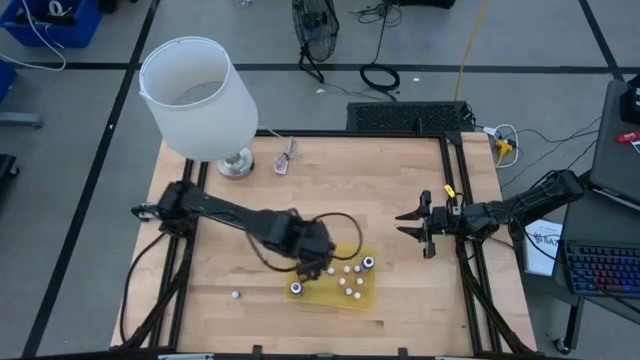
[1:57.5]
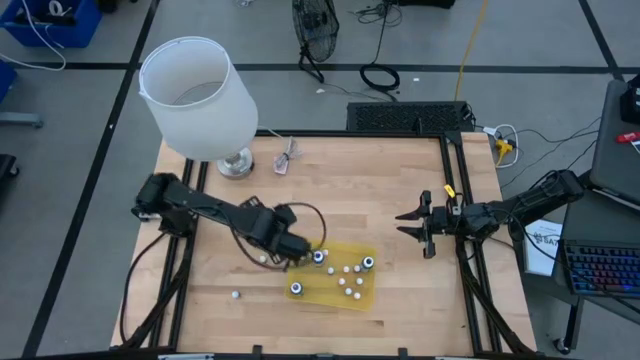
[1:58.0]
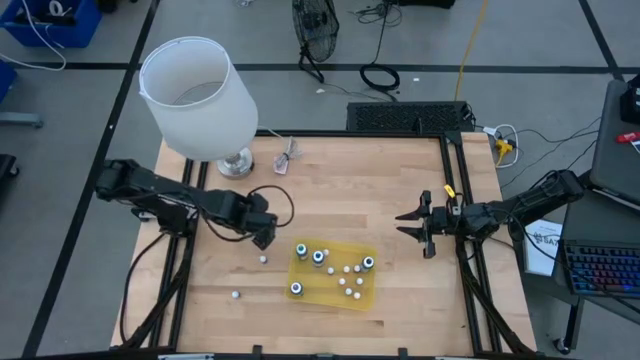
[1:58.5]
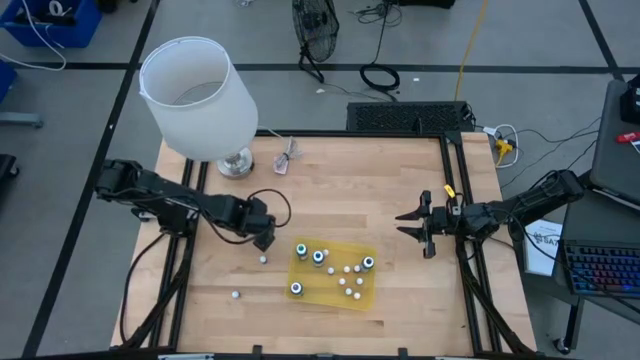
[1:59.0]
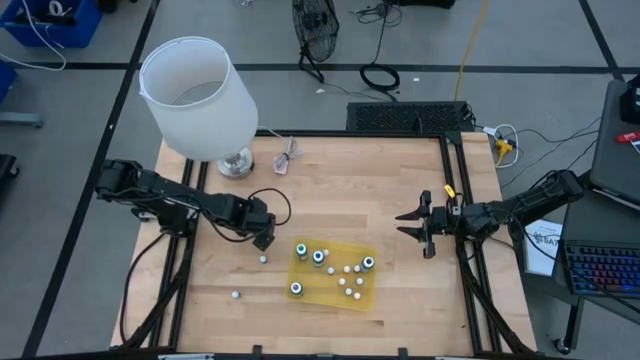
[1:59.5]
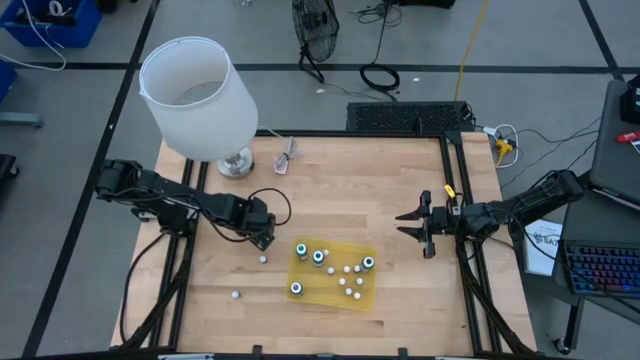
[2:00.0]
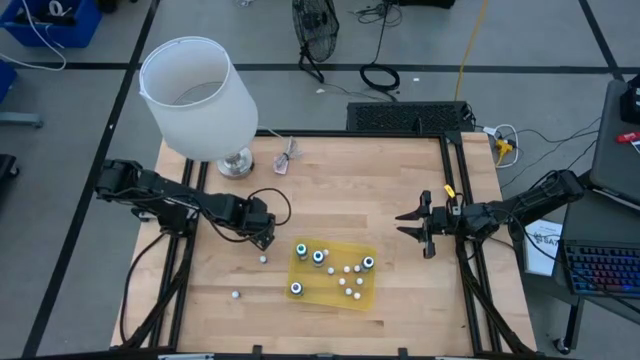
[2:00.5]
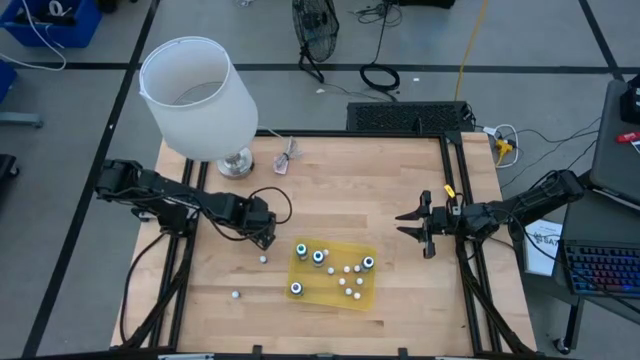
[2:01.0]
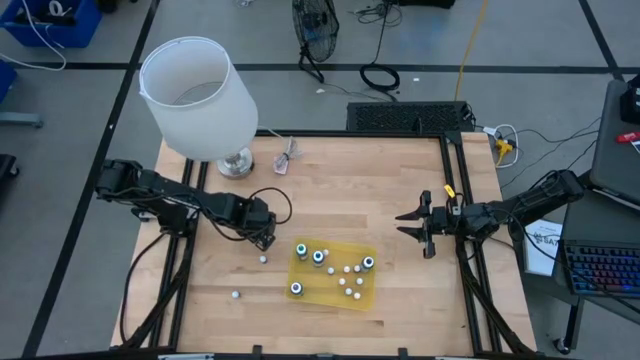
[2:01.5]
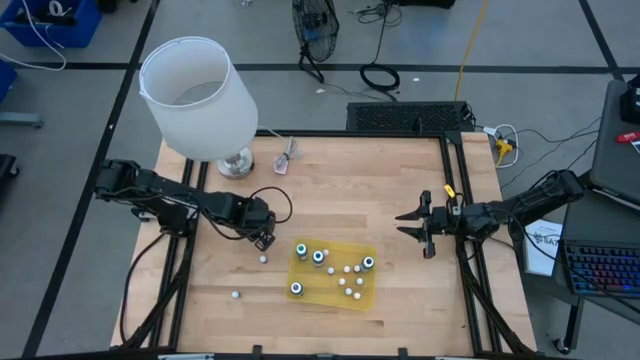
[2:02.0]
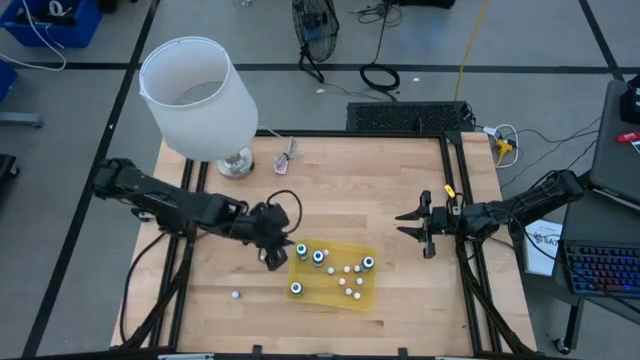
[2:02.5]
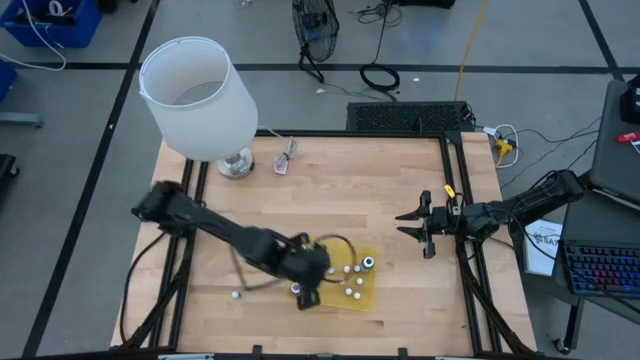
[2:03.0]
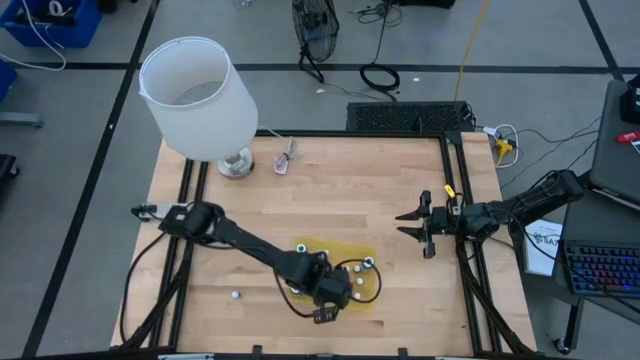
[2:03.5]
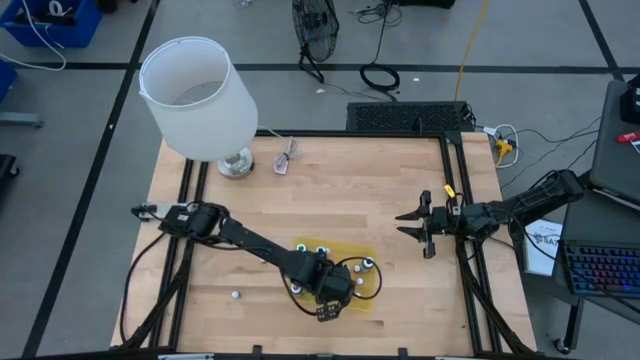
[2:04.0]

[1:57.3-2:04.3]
Task: Pick & Place food coloring
Put the small dark blue food coloring bottle into the yellow container

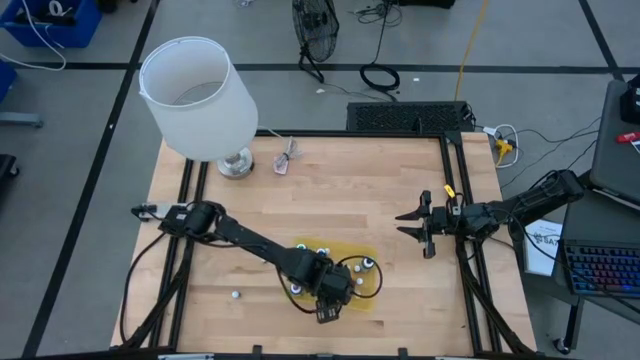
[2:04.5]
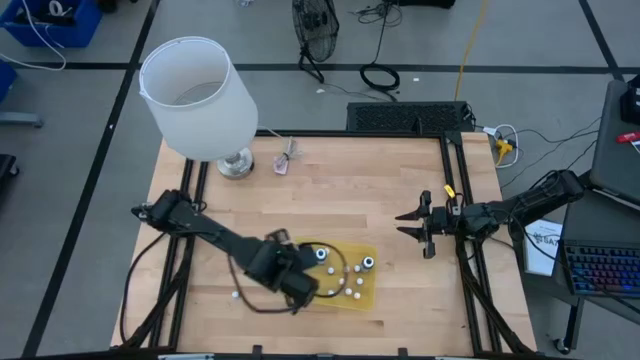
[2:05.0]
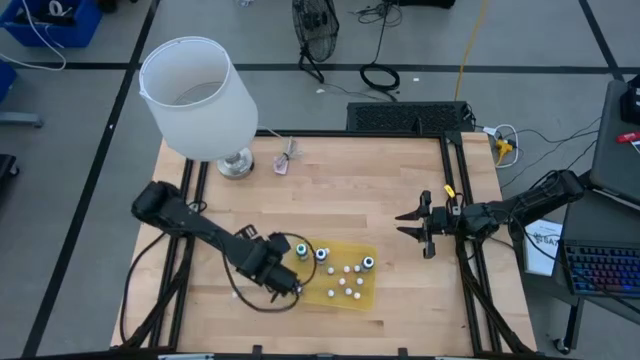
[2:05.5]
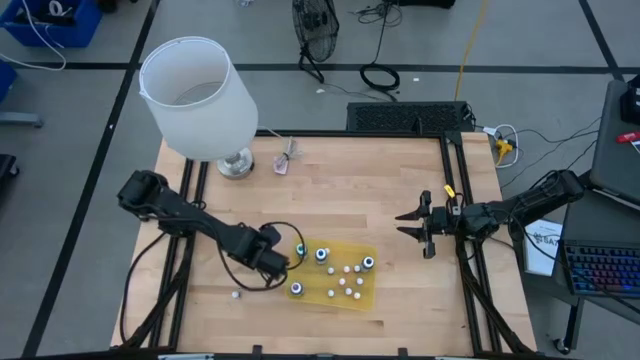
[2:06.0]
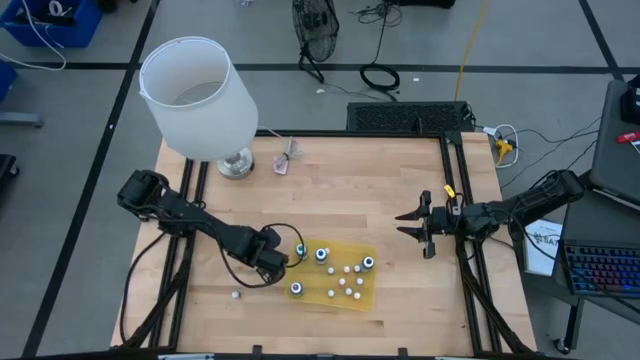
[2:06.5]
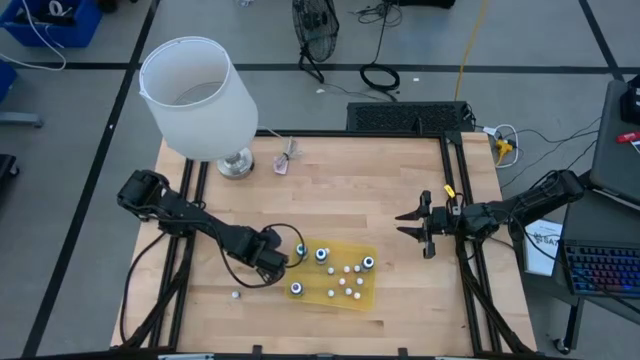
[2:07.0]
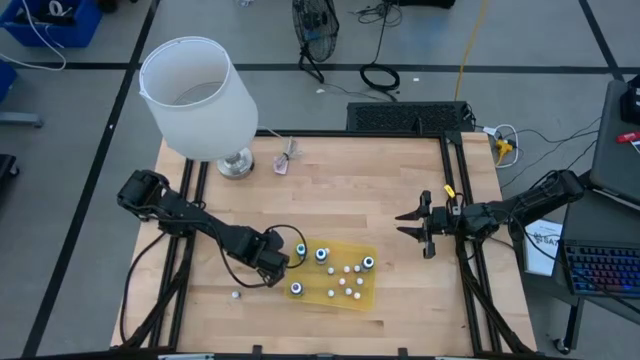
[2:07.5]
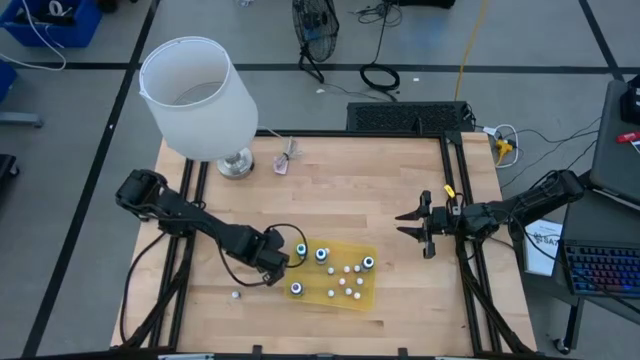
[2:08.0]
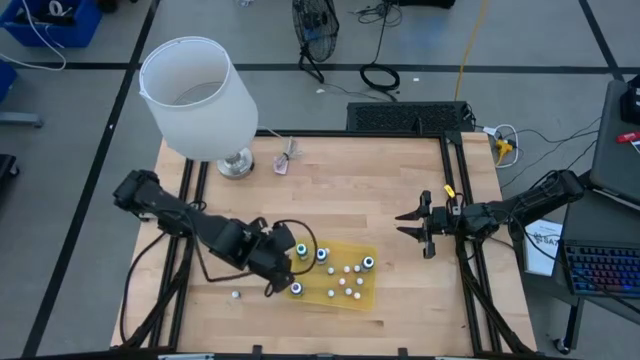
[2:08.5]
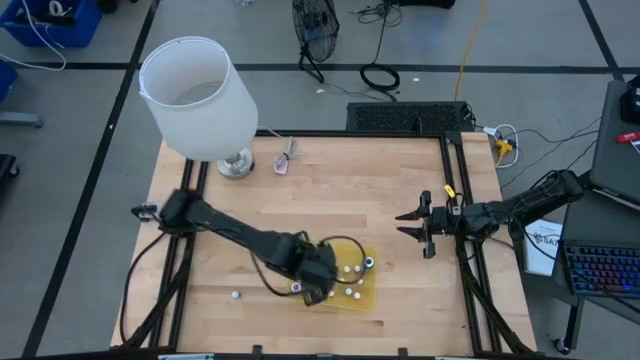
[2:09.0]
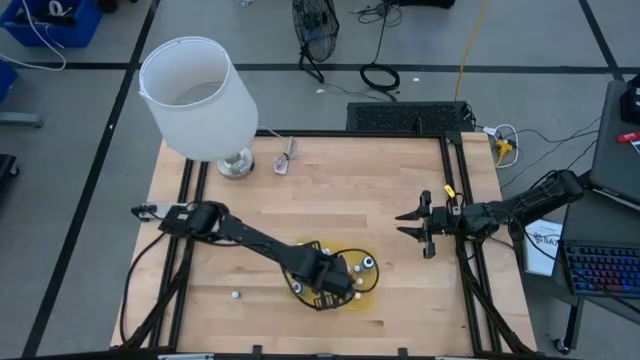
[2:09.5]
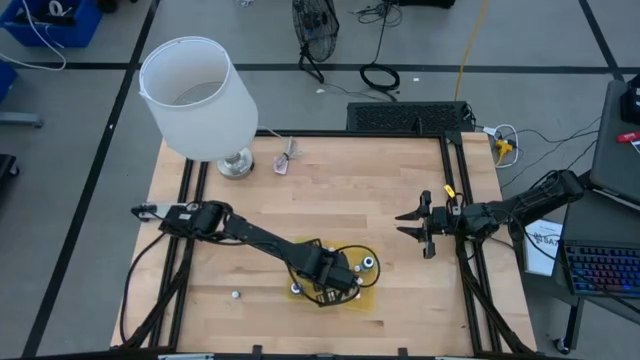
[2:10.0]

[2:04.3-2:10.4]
Put the small purple food coloring bottle into the yellow container

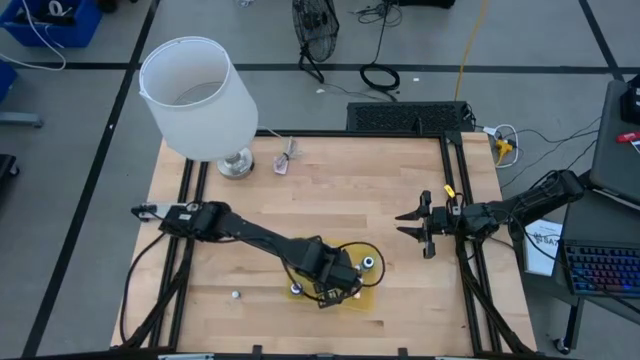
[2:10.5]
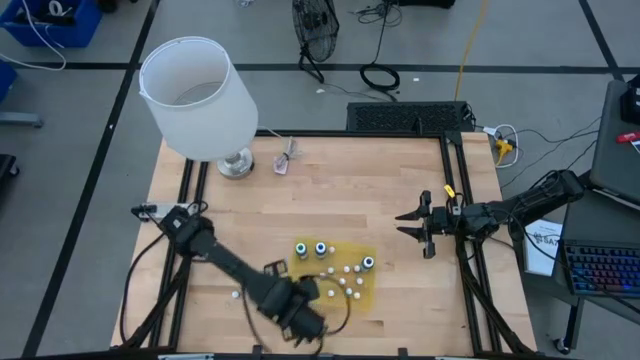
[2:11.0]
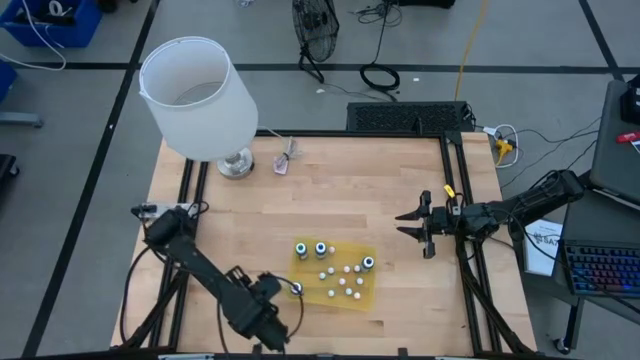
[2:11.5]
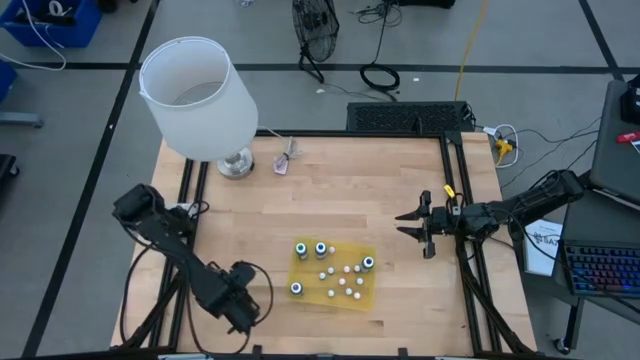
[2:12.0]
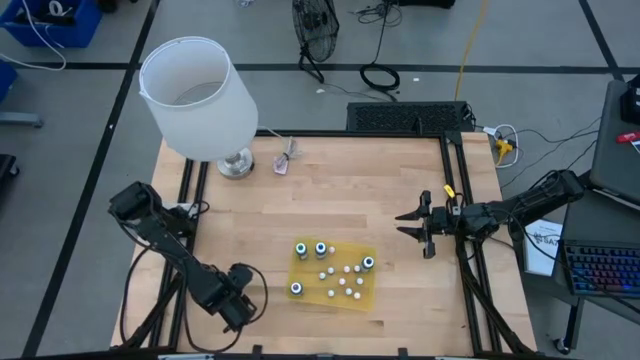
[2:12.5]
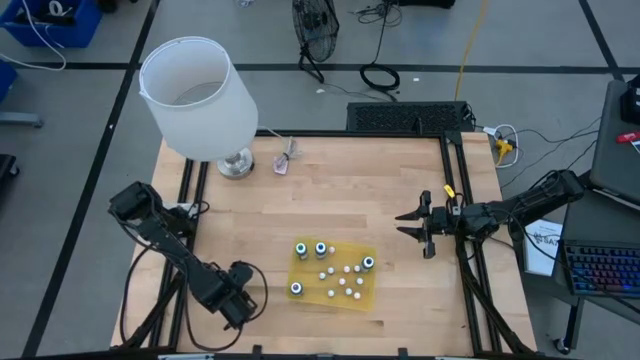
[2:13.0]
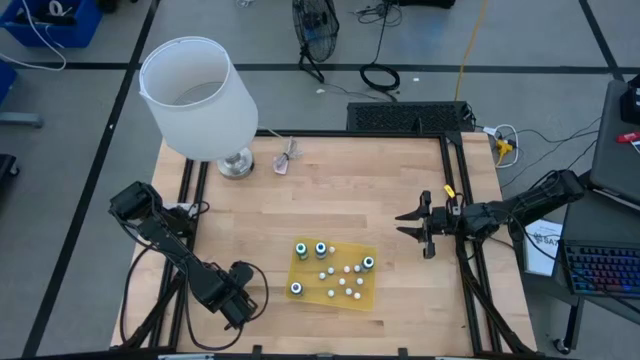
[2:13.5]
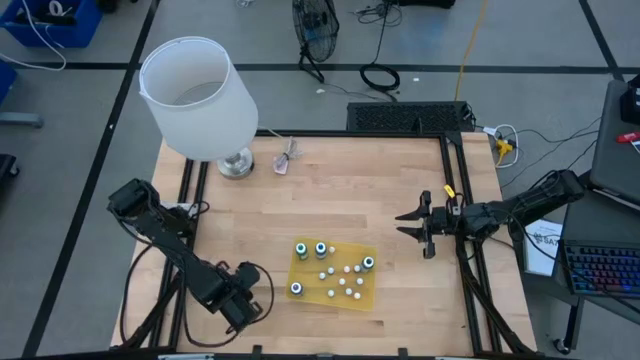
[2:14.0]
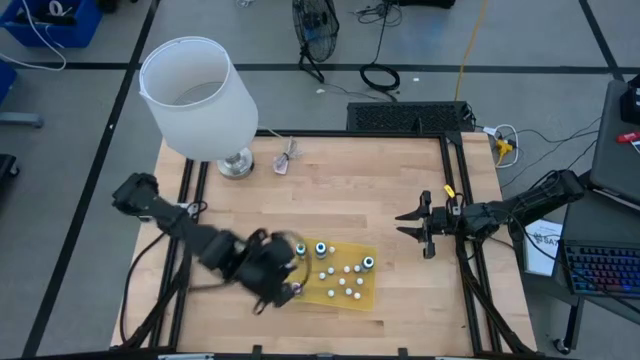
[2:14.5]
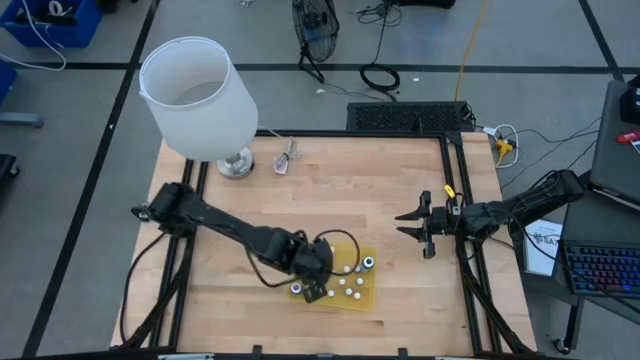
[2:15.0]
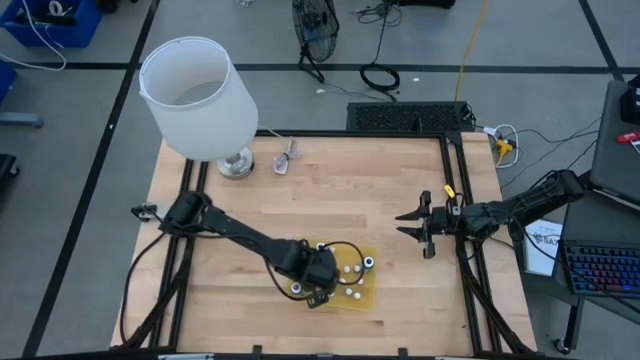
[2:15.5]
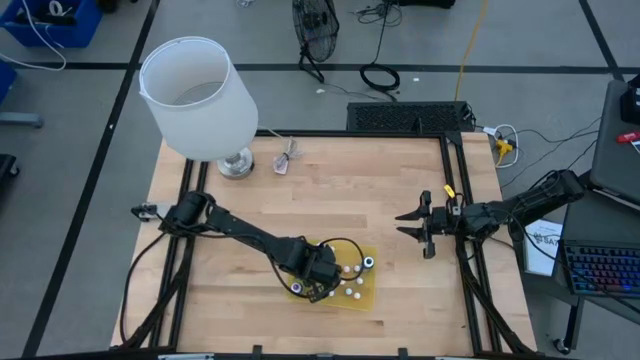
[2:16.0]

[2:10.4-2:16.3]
Put the small dark blue food coloring bottle into the yellow container

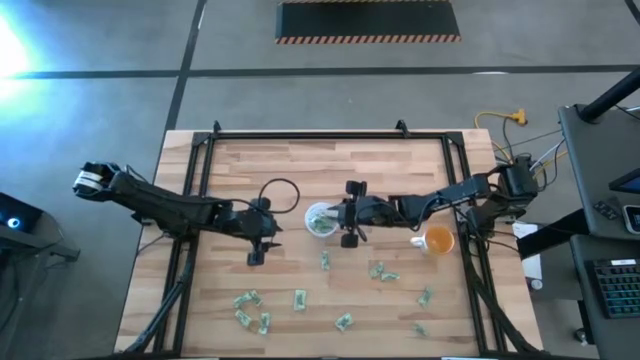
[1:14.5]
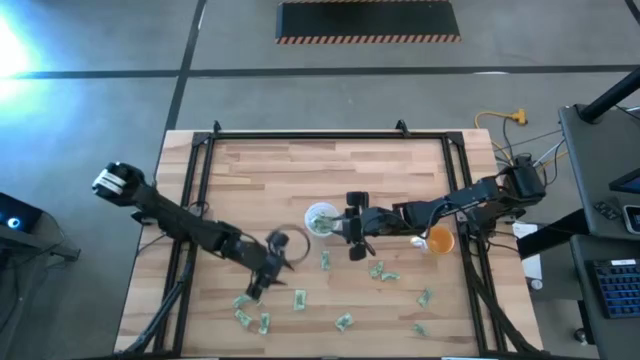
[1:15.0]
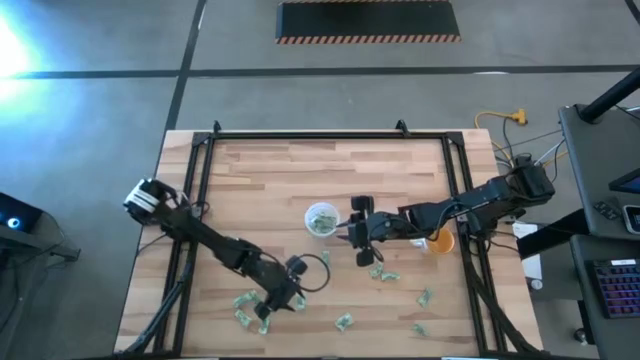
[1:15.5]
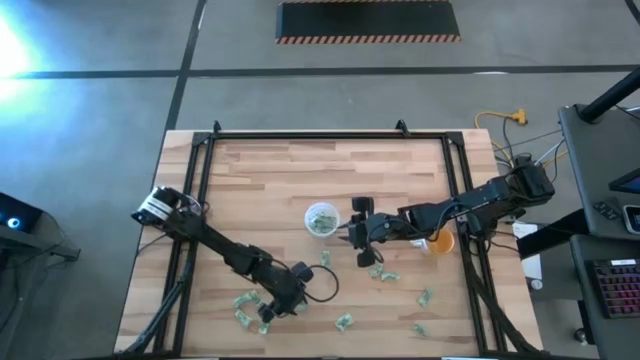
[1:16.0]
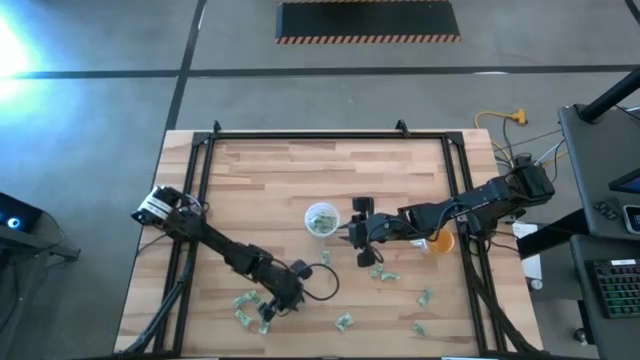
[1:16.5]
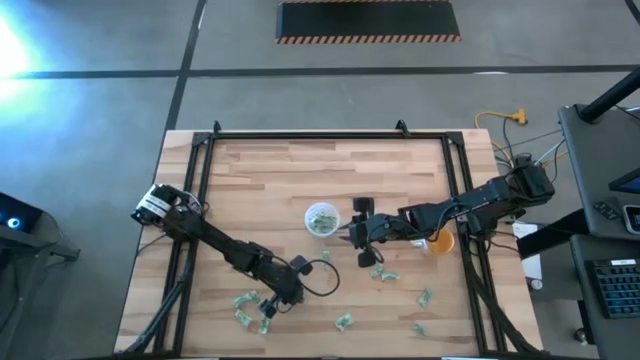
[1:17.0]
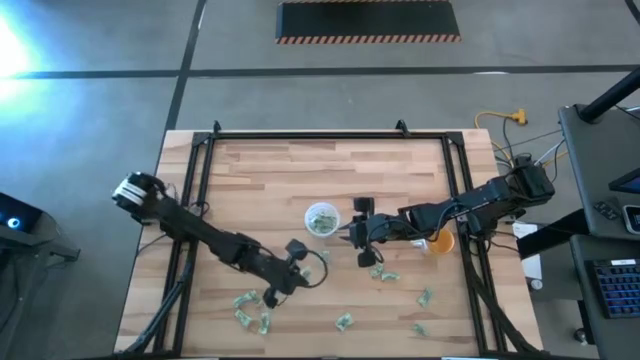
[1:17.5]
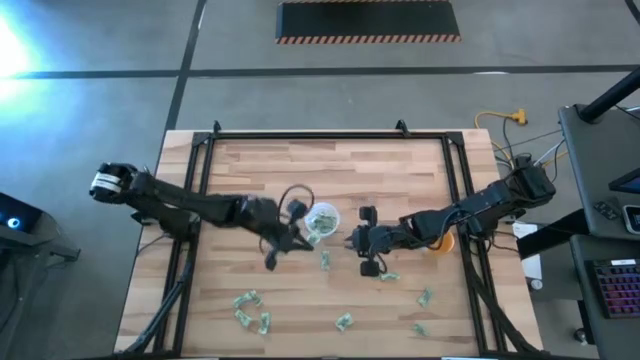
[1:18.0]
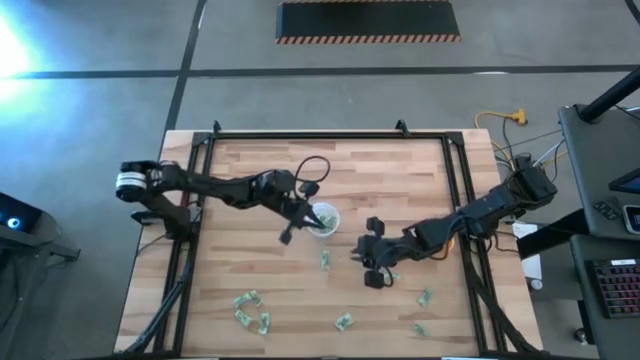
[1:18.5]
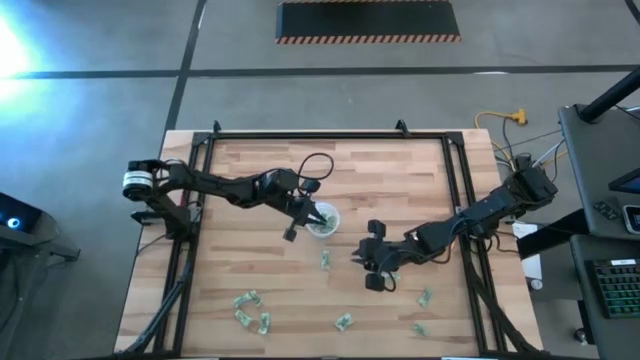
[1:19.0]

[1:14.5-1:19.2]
Task: Pick and place Stevia / Truvia into bins
Put the light green stevia packet into the transparent container
